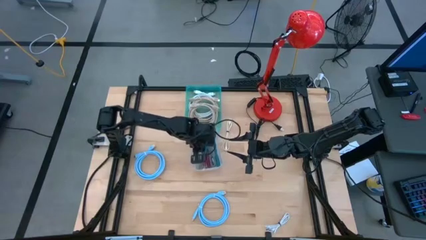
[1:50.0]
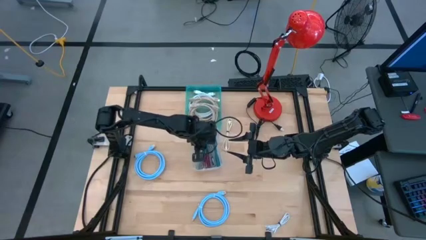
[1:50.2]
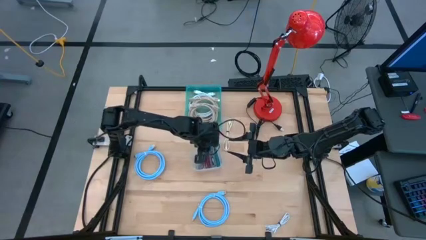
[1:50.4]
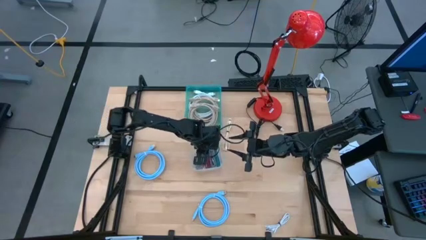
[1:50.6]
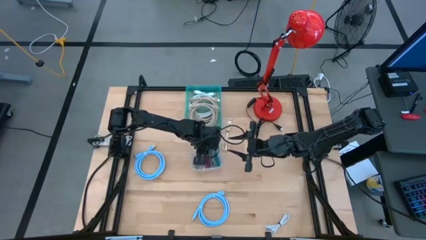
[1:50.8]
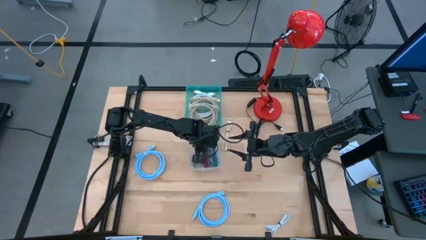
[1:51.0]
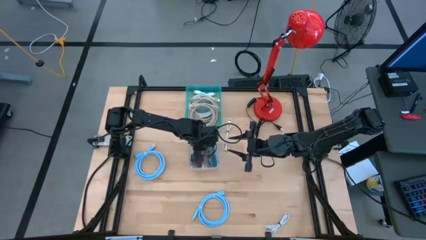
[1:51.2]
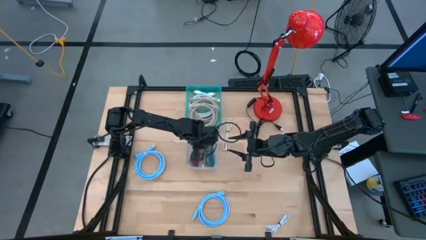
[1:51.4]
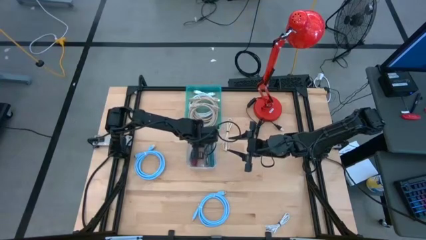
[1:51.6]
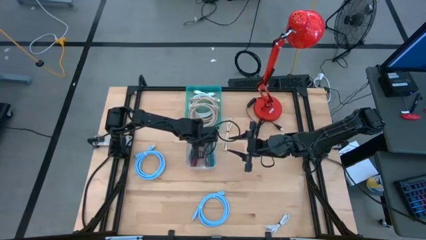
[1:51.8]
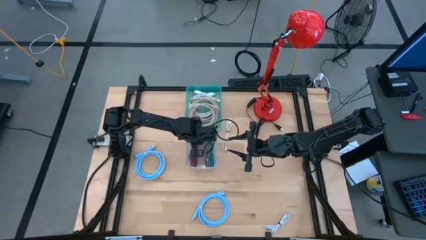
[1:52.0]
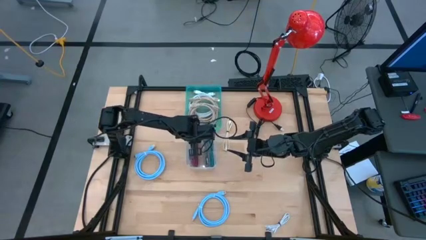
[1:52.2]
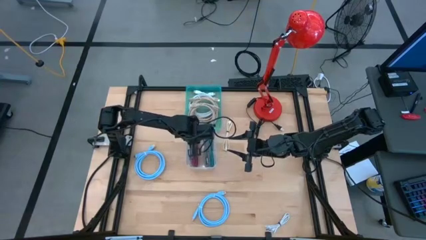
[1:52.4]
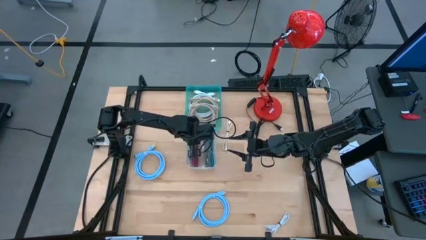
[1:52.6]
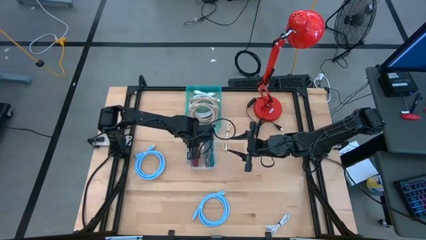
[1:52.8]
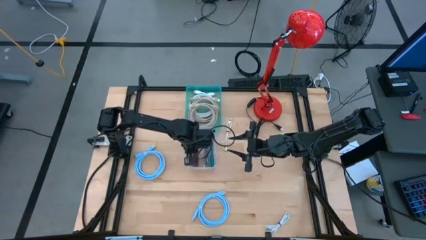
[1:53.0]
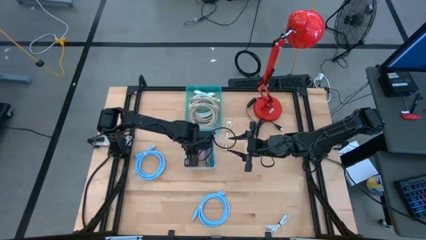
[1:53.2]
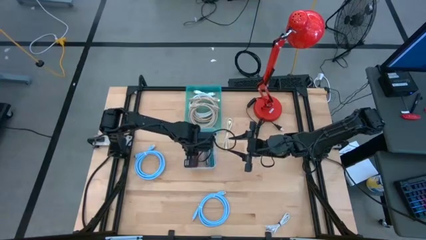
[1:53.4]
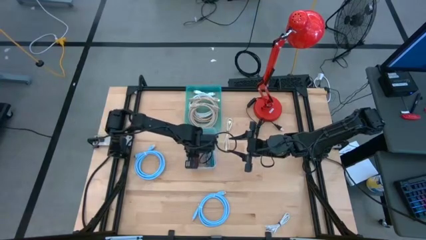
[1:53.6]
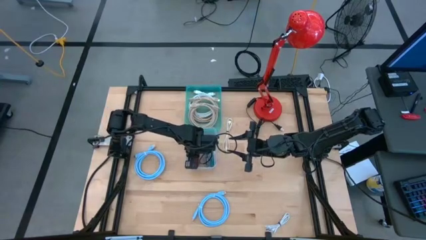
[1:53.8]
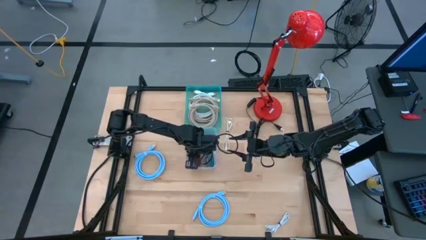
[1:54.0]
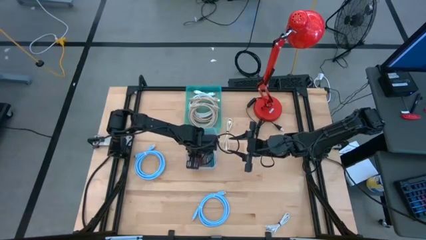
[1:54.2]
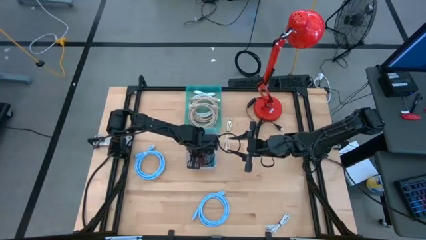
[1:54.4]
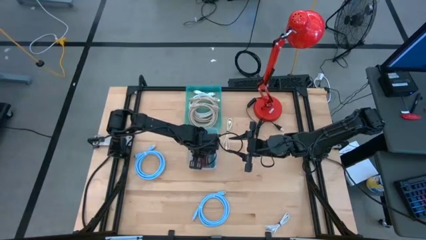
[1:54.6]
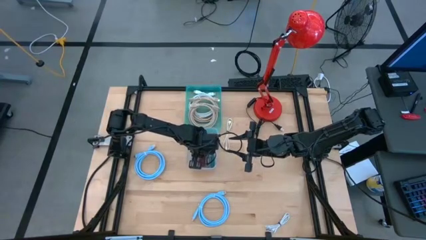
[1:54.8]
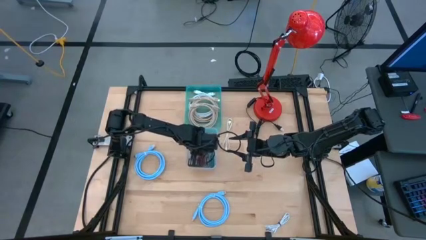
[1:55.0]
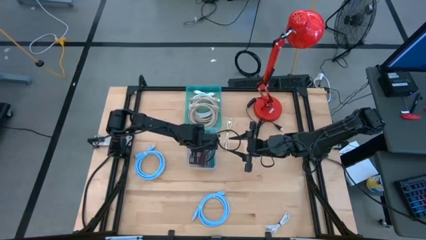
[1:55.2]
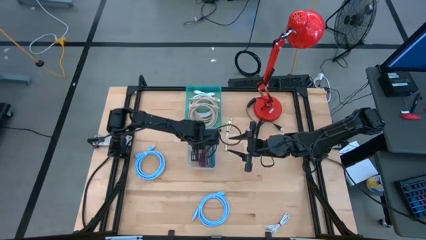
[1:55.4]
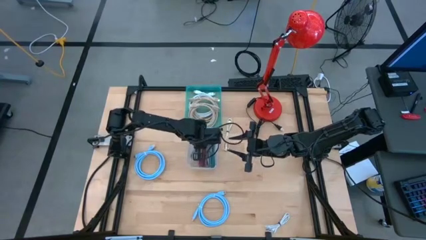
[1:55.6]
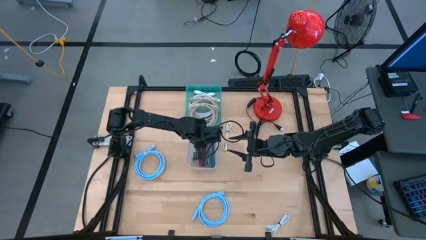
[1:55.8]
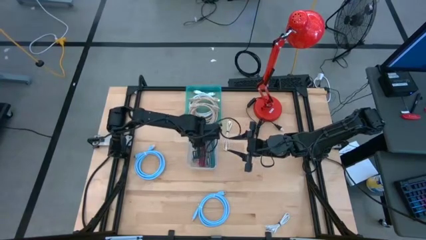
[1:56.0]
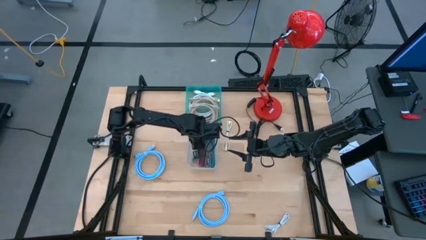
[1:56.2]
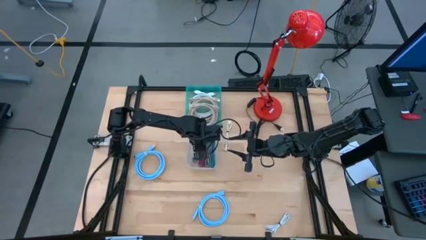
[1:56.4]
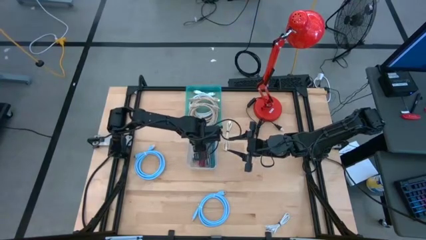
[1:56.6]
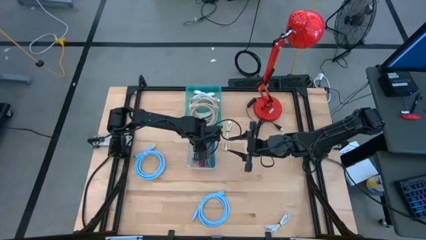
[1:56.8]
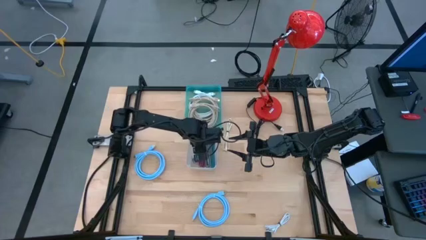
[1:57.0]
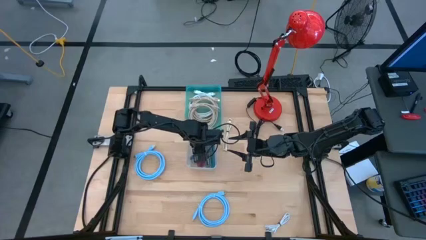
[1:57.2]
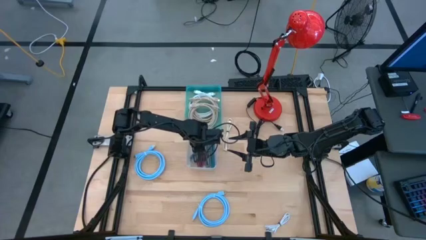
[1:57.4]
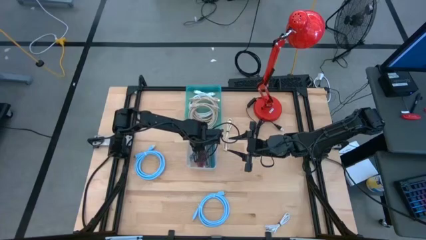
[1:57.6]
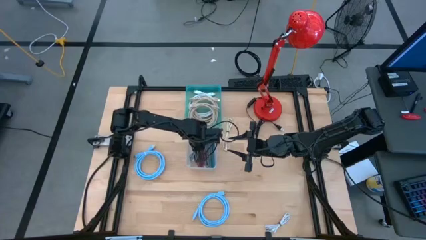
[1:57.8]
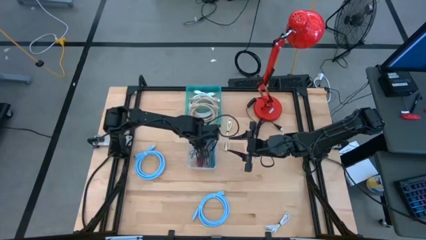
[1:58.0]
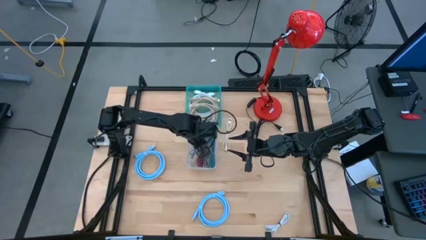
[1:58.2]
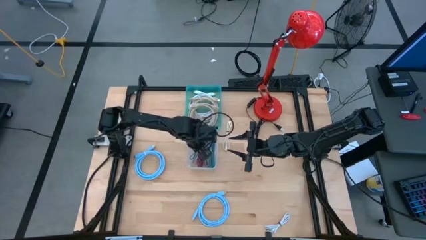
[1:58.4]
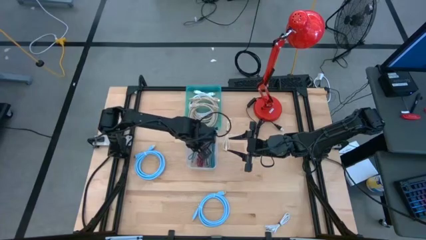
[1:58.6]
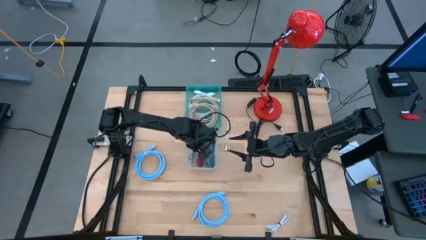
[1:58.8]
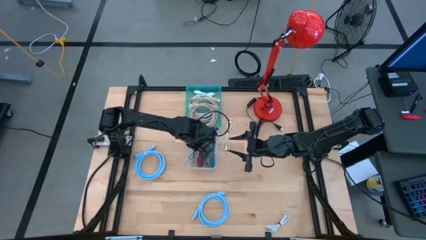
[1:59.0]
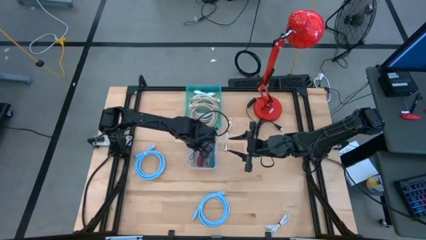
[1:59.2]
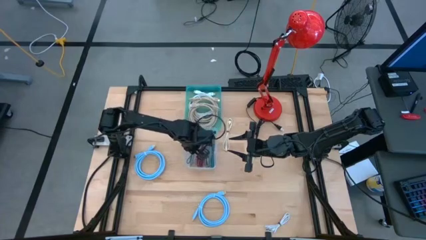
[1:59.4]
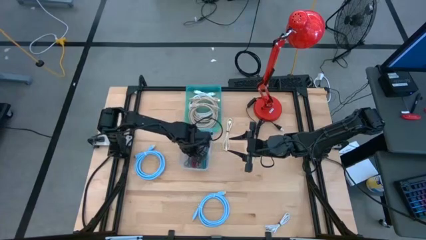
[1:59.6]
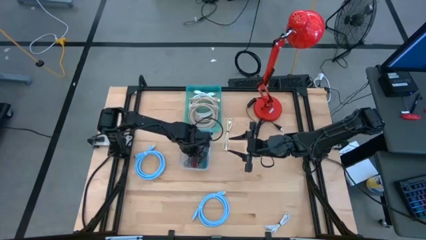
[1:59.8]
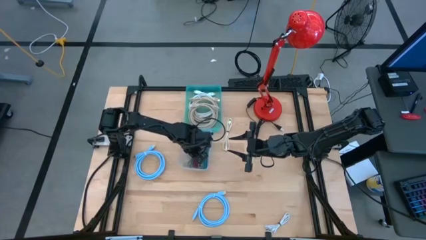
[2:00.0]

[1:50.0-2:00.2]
Task: Pick & Place USB Port
Put the blue black tied USB cable into the transparent bin

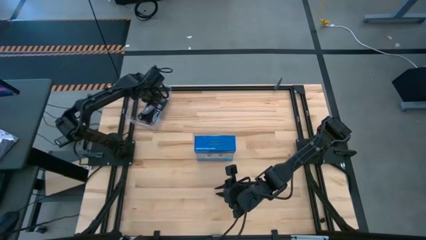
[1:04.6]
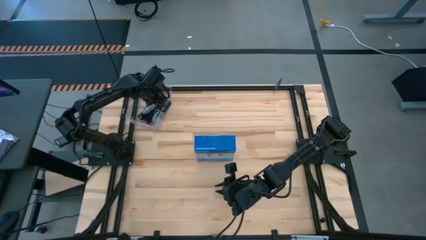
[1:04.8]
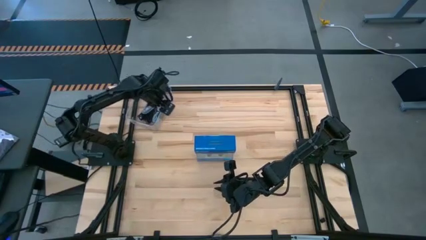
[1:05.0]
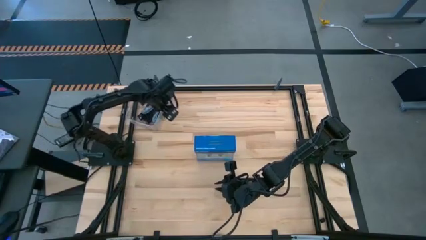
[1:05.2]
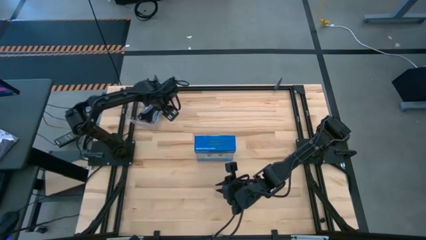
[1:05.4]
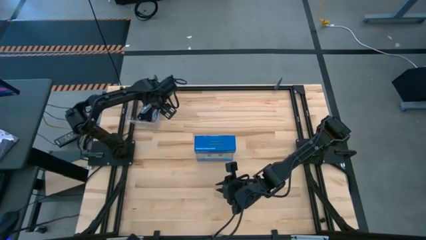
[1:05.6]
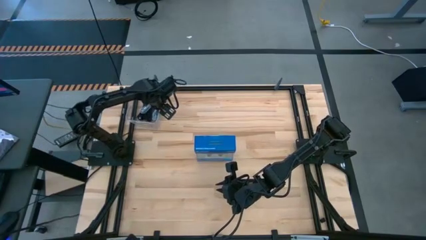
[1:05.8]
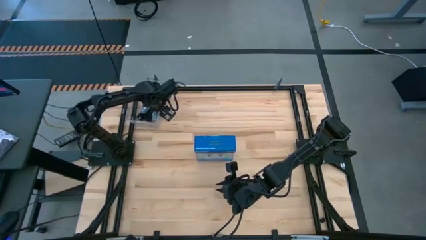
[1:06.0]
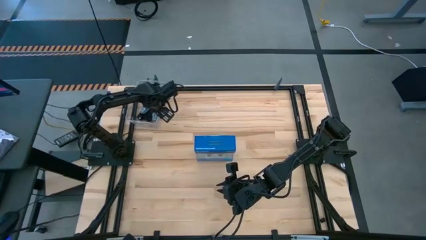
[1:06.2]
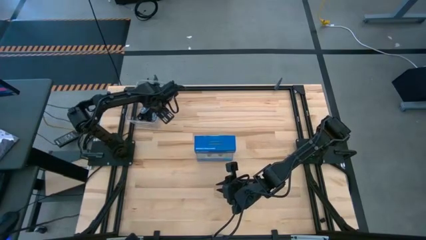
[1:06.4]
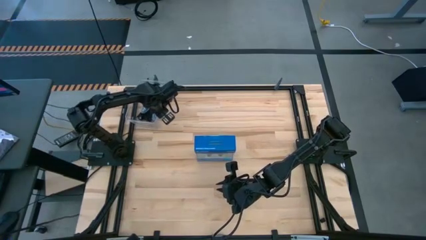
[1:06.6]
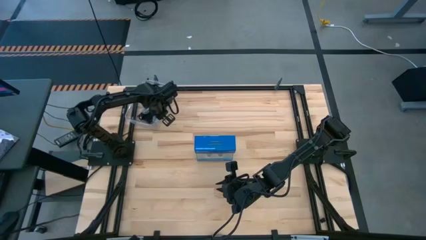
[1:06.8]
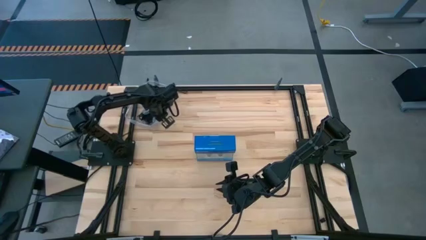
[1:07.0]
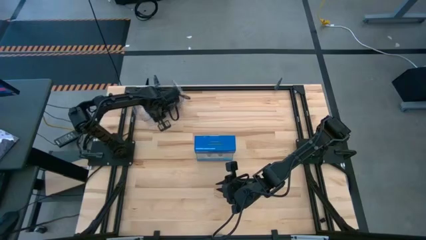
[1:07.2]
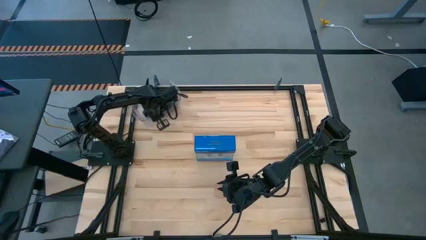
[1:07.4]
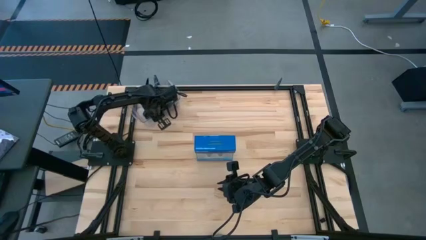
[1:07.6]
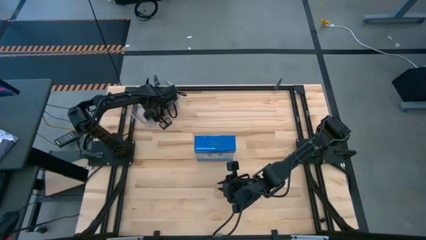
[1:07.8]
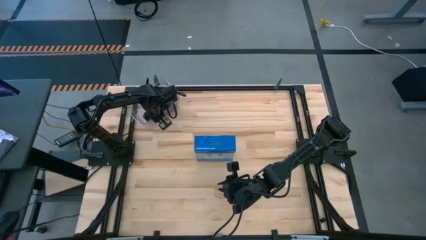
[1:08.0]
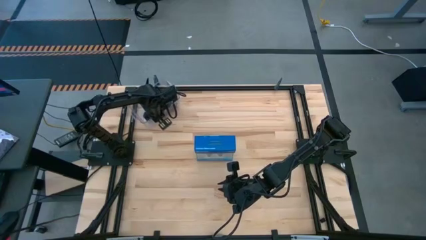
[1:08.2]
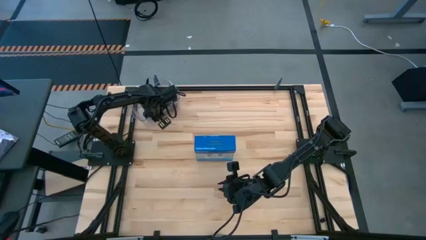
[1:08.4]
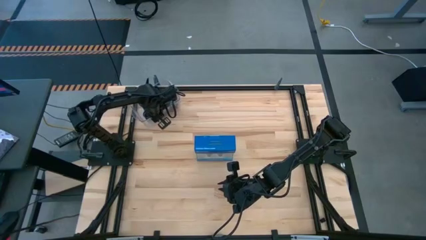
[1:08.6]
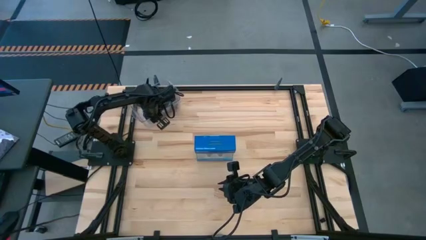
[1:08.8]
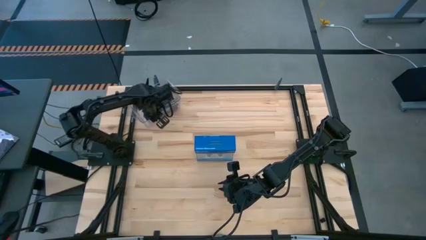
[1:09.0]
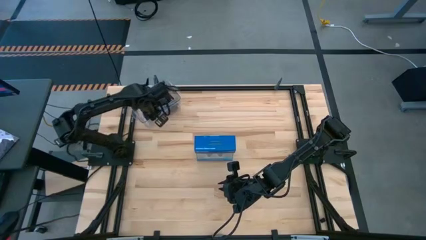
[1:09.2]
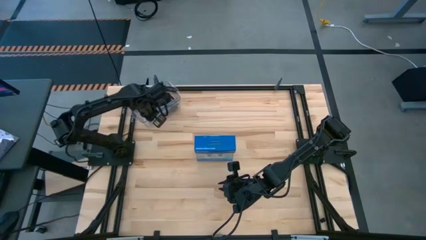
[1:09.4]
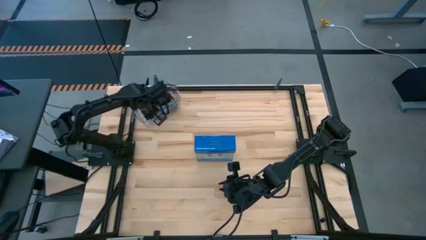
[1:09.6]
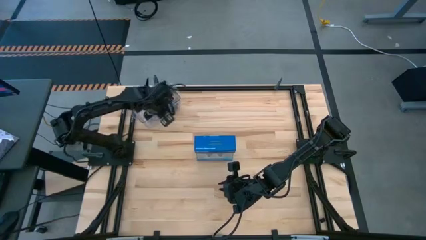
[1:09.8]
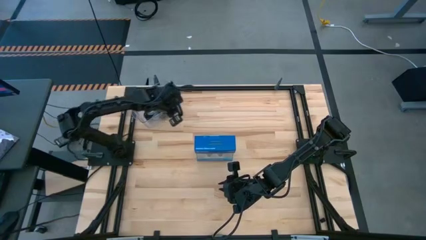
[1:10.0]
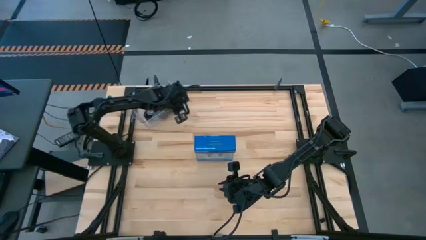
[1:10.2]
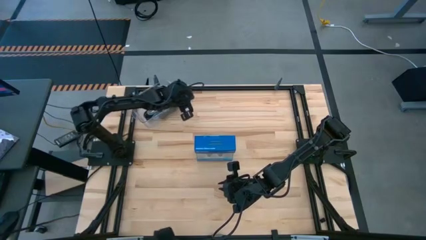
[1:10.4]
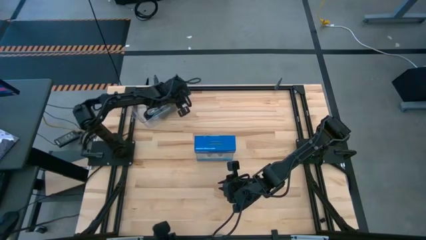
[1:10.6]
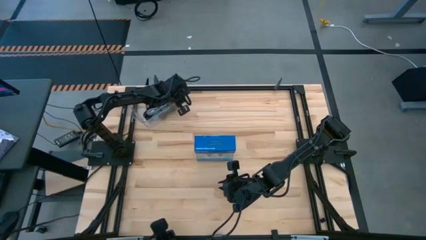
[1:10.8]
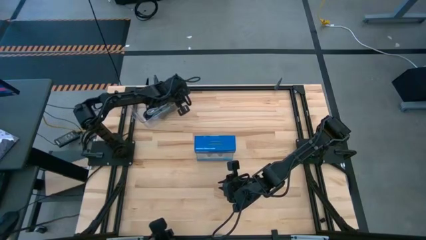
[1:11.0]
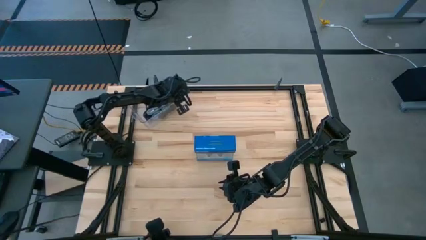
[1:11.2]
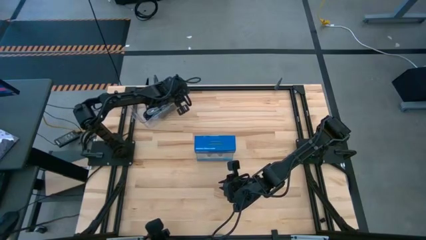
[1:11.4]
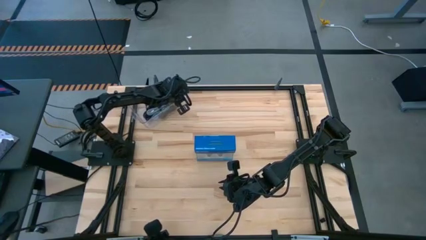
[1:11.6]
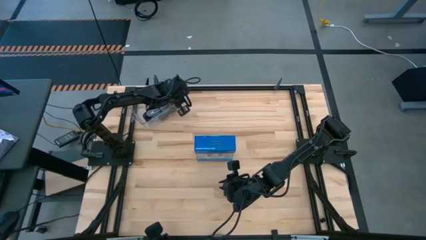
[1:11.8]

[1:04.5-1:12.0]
Task: Pick and place USB-C Cables
Adjust the transparent bin
